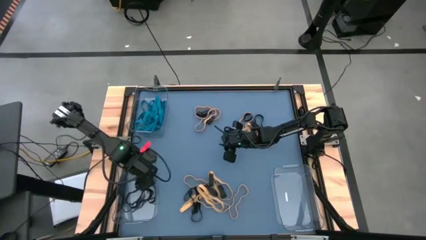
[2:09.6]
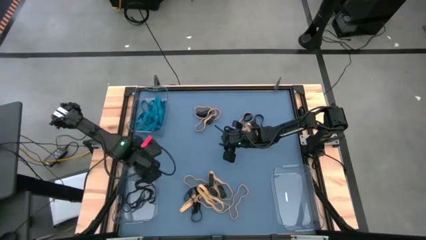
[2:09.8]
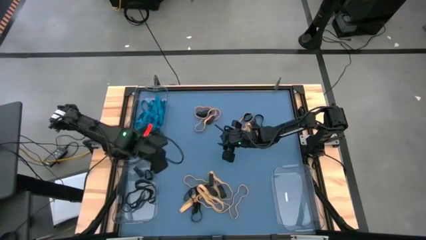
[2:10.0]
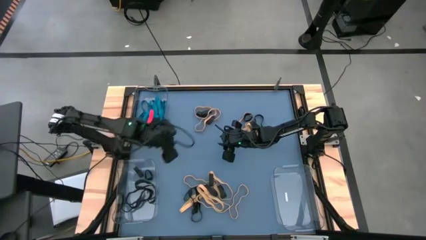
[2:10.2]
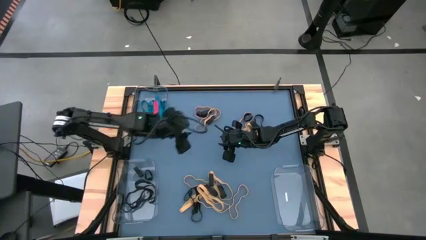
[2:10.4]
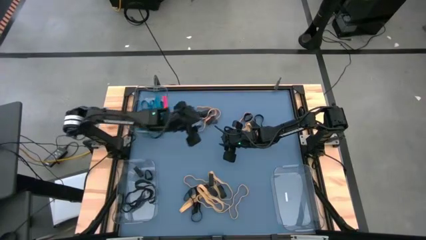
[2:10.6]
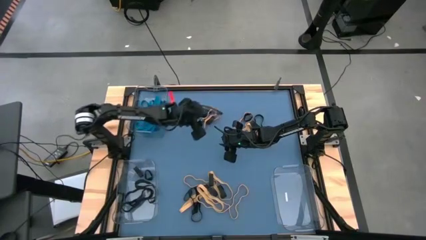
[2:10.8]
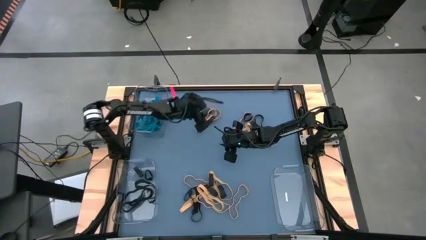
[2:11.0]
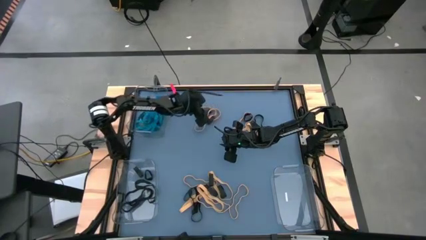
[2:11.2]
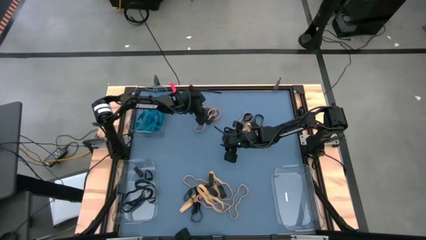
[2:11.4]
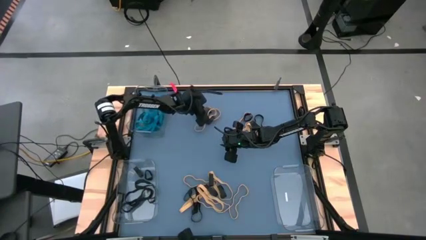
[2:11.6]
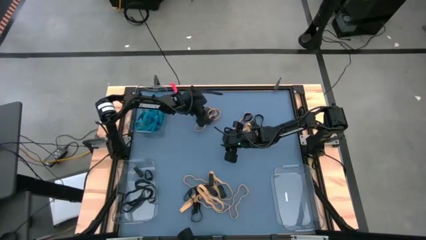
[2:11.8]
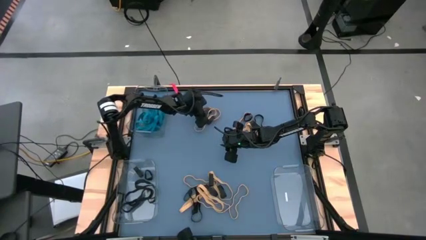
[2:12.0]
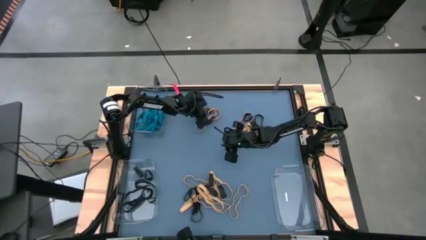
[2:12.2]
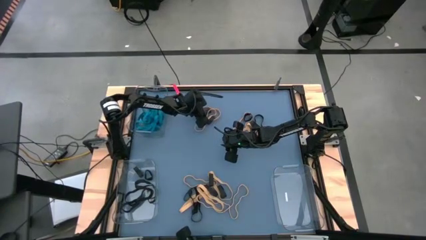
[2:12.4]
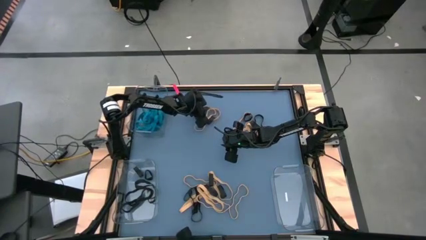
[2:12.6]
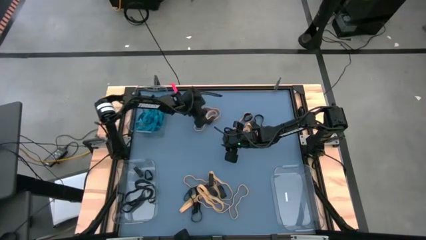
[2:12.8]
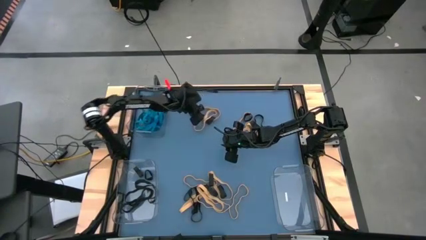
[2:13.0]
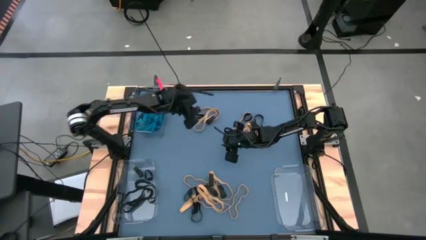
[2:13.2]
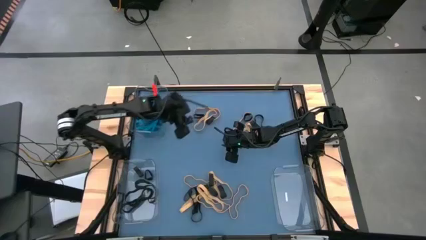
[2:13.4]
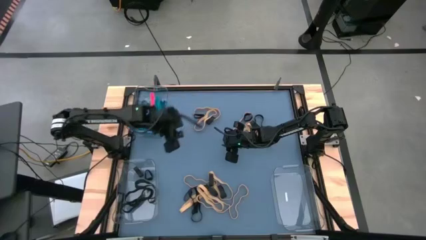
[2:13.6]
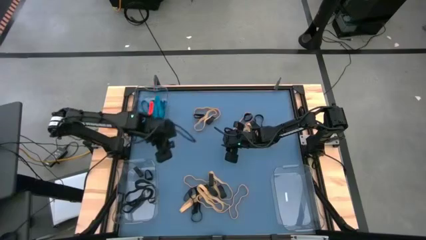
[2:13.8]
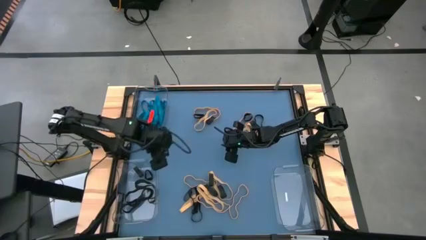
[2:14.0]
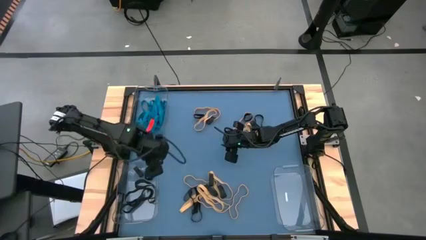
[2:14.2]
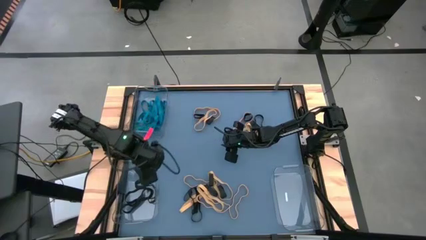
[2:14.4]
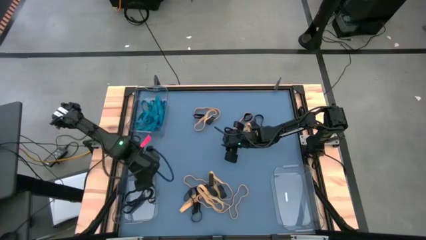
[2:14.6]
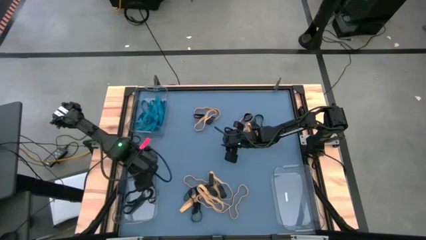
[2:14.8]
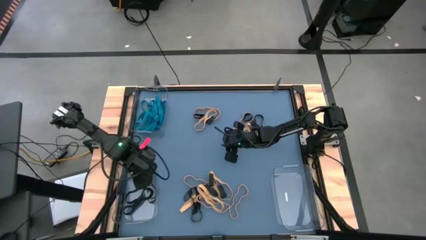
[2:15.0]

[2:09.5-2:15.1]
Task: Sort rubber bands into baskets
Put the black rubber band into the bottom left transparent bin

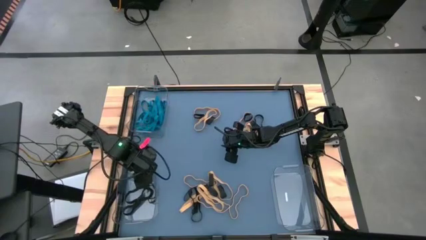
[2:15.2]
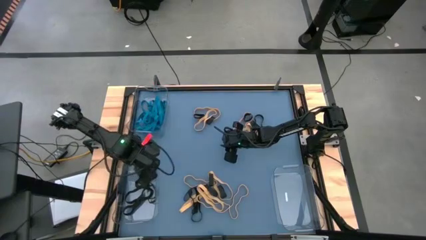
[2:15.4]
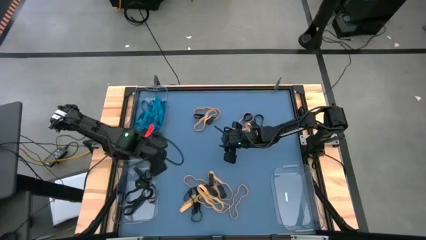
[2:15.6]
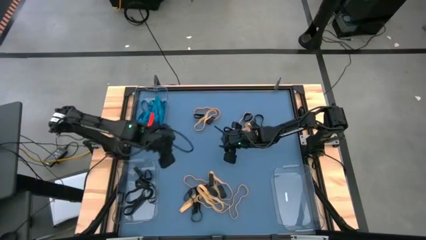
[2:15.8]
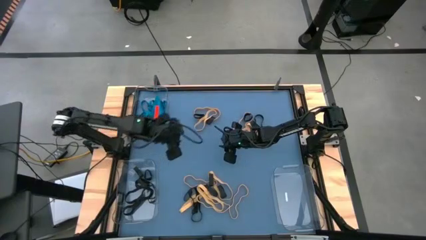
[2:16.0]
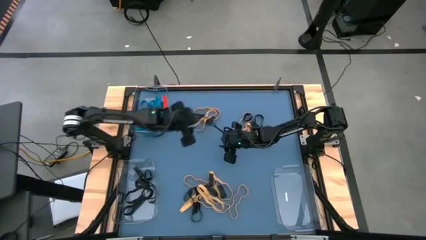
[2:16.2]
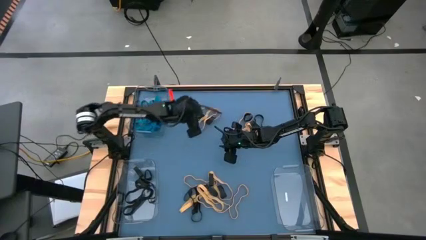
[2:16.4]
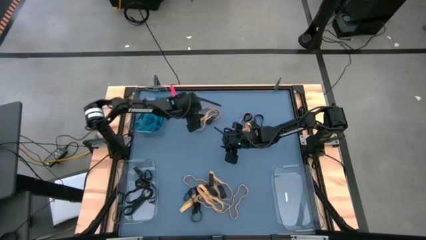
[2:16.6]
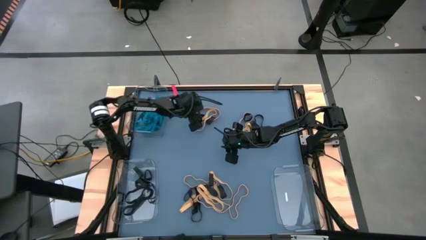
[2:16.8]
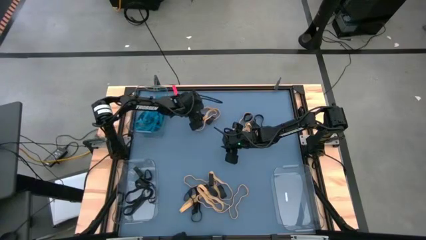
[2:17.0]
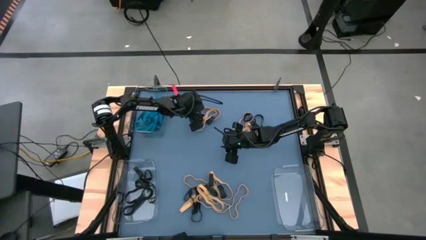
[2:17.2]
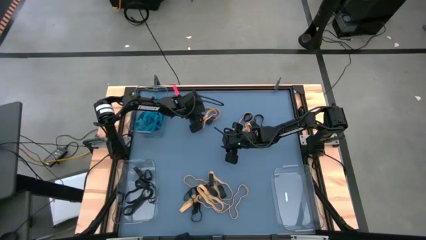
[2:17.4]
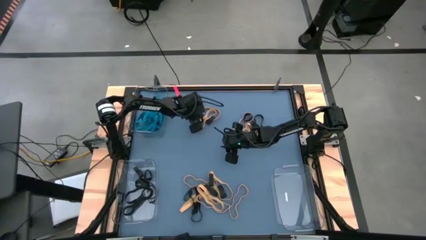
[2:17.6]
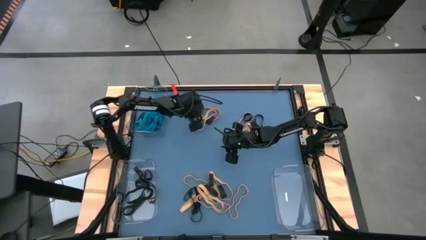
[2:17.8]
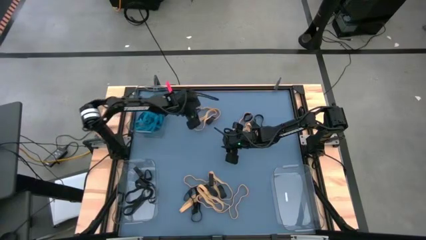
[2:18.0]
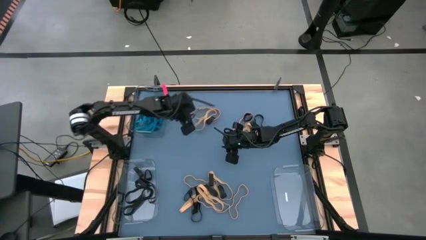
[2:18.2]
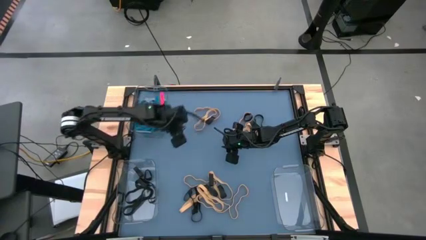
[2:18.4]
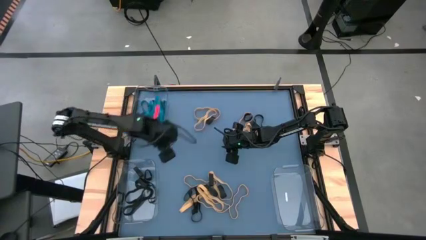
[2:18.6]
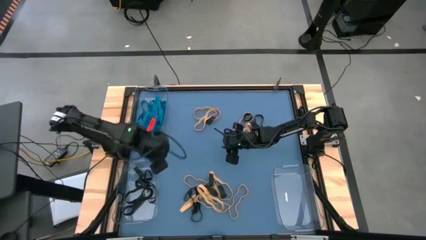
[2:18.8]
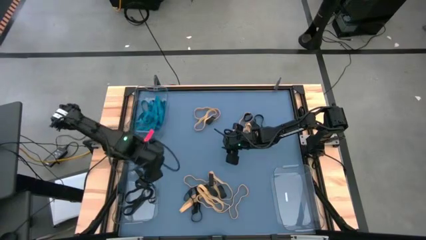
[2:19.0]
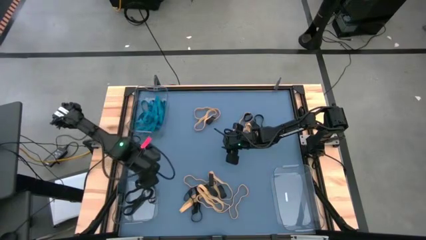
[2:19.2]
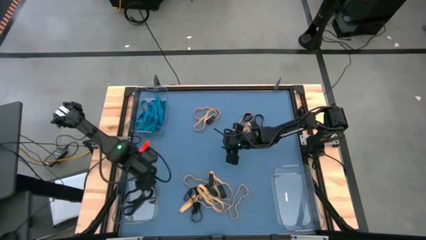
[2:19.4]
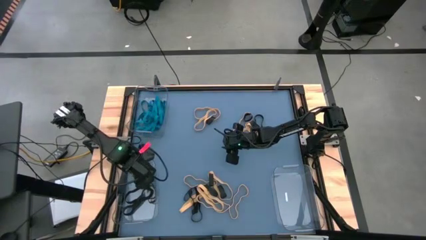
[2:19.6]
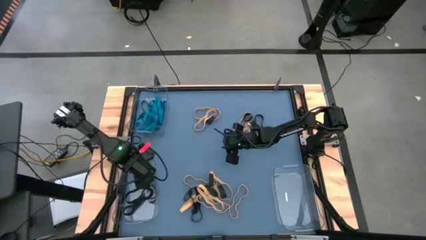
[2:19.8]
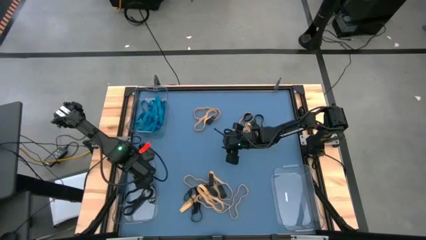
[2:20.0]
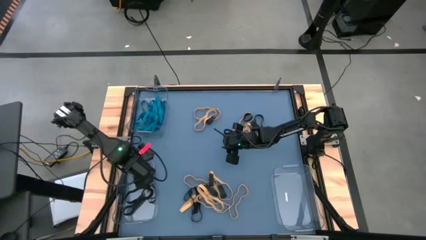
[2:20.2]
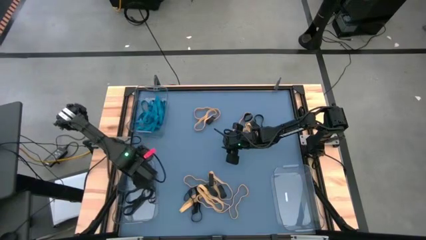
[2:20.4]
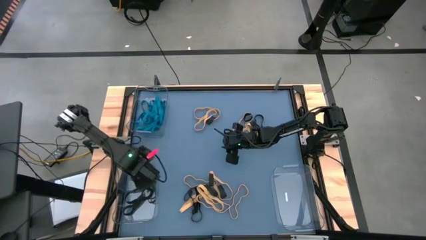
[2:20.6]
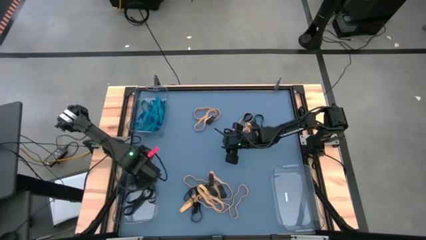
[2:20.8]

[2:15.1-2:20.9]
Put the black rubber band into the bottom left transparent bin

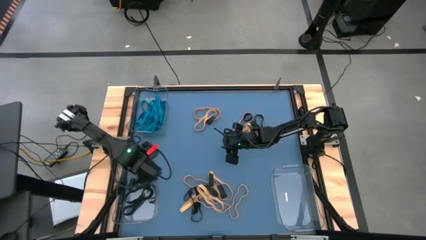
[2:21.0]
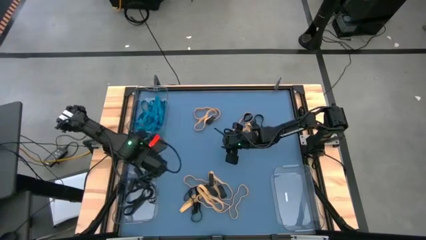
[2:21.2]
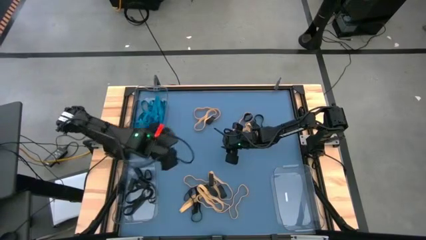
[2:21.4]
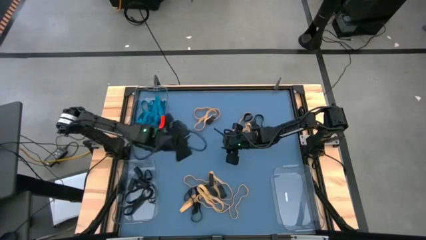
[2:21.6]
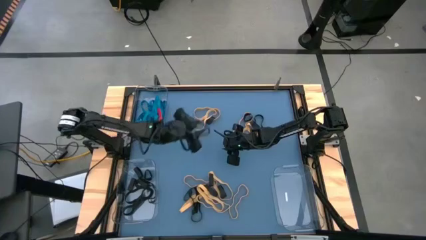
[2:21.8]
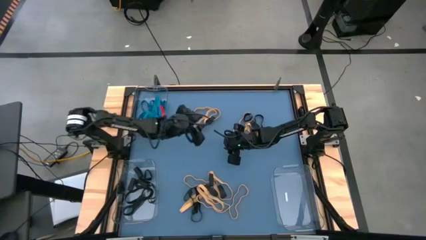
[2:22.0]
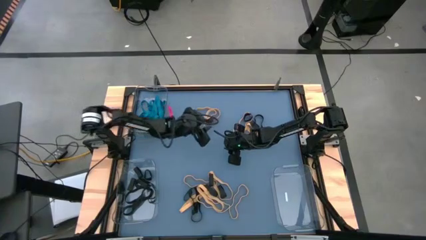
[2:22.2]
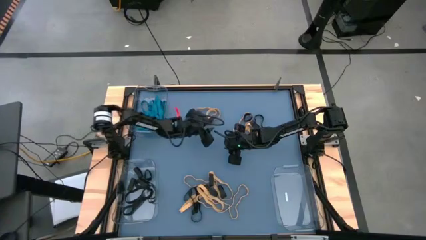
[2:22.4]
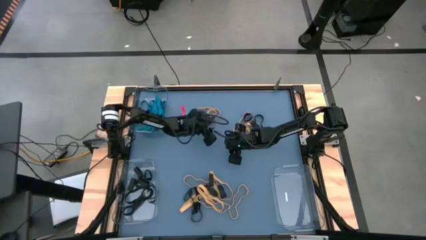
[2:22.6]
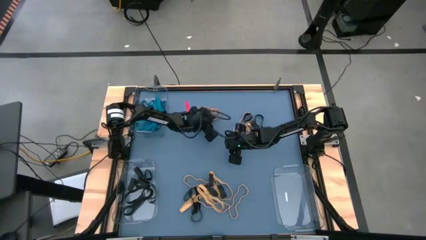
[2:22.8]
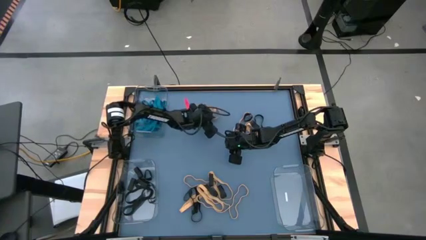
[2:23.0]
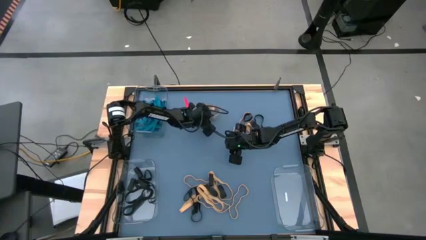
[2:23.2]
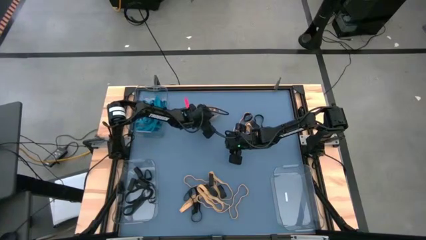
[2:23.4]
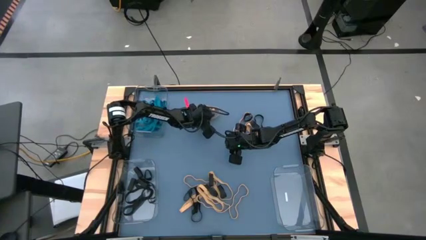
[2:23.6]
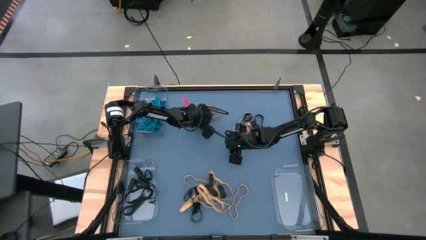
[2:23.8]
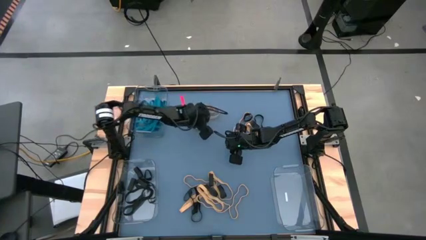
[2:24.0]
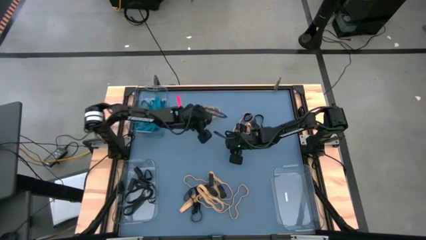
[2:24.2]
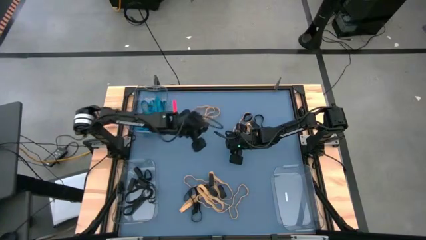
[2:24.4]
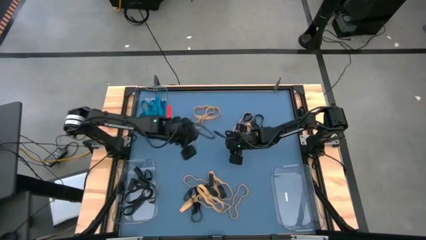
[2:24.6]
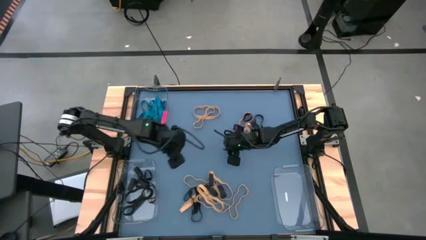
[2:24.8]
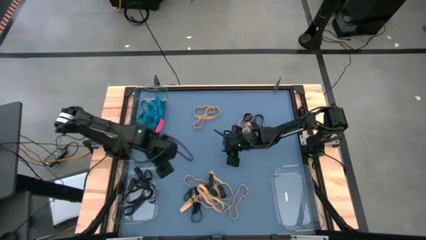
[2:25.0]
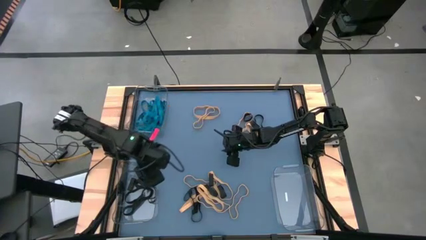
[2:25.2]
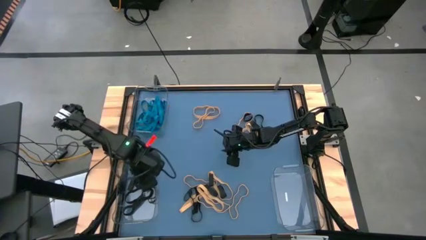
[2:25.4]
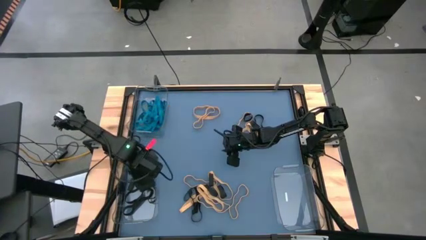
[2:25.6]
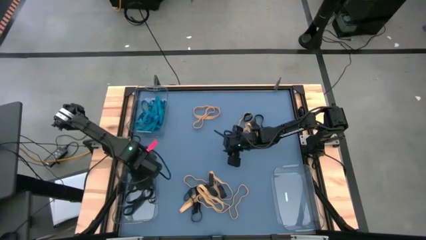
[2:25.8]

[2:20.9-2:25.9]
Put the black rubber band into the bottom left transparent bin
